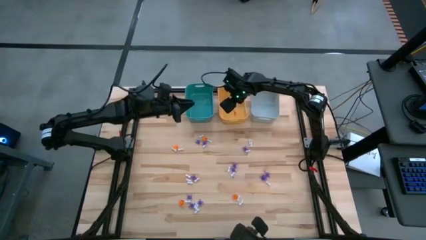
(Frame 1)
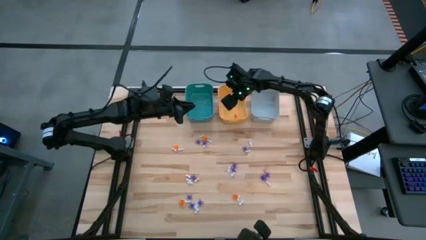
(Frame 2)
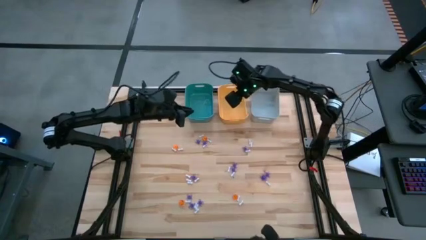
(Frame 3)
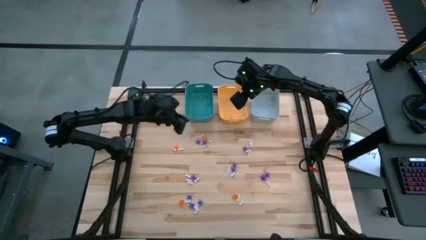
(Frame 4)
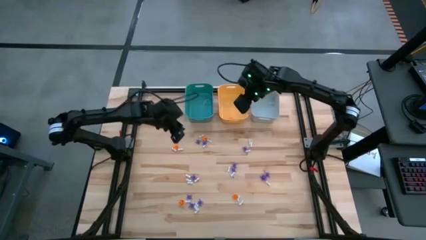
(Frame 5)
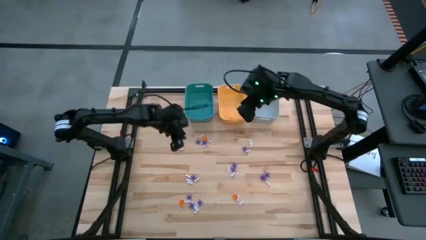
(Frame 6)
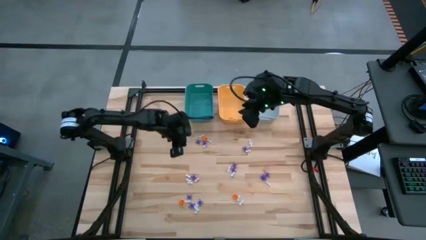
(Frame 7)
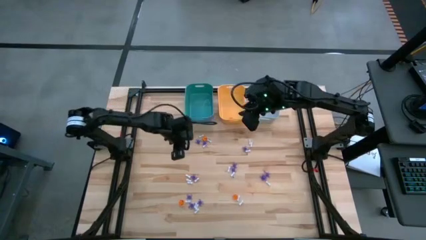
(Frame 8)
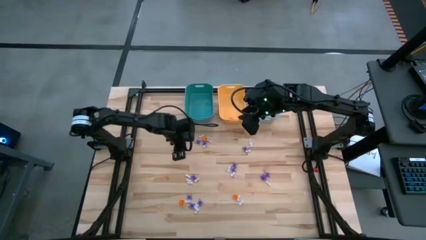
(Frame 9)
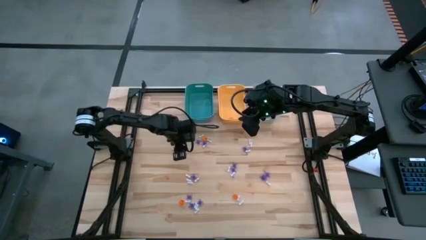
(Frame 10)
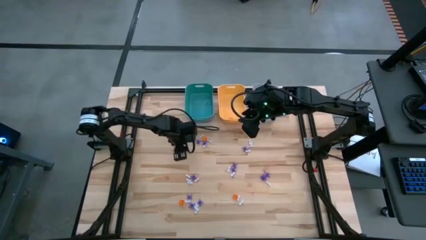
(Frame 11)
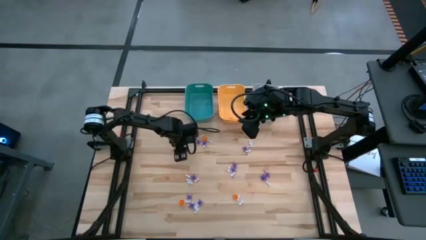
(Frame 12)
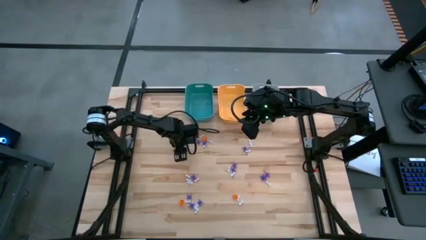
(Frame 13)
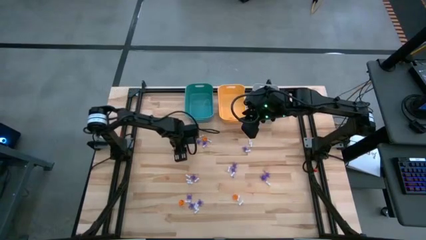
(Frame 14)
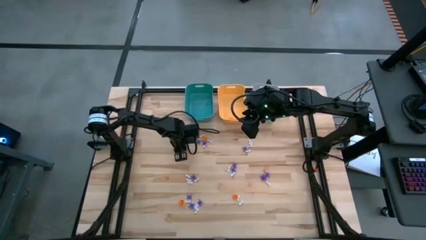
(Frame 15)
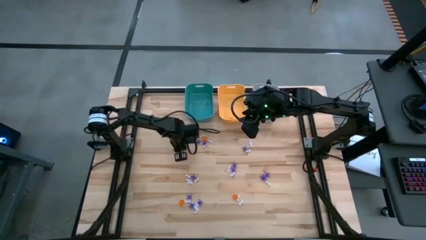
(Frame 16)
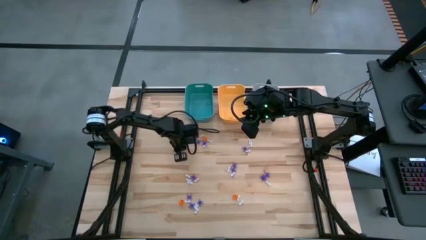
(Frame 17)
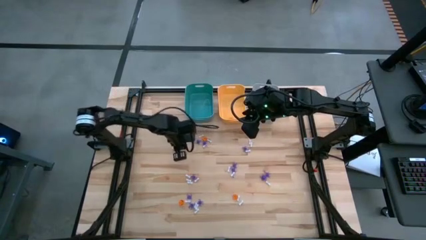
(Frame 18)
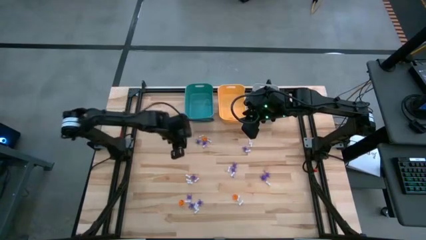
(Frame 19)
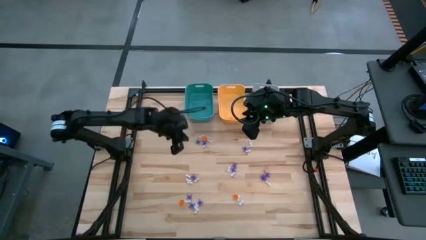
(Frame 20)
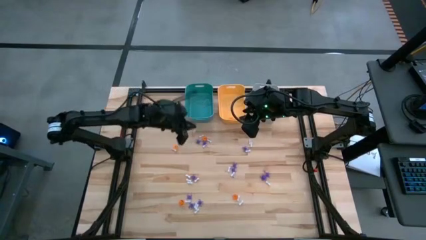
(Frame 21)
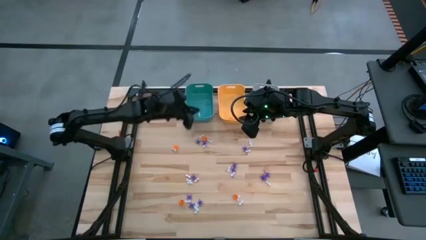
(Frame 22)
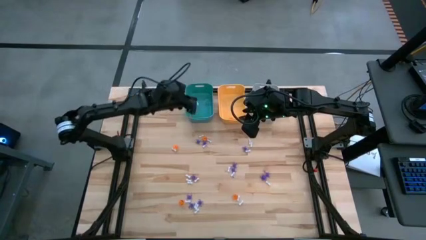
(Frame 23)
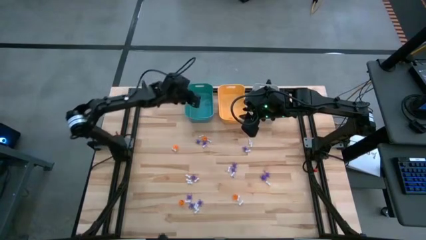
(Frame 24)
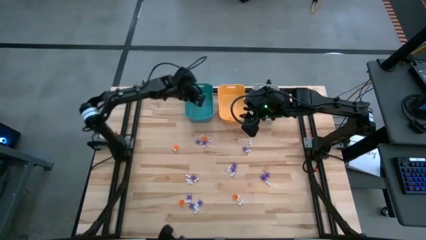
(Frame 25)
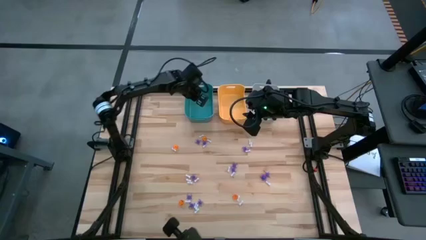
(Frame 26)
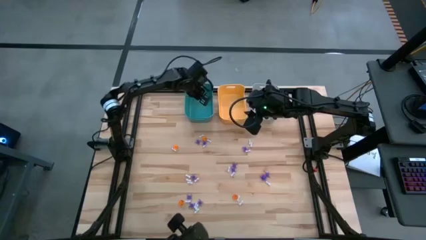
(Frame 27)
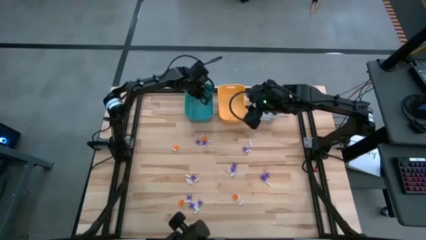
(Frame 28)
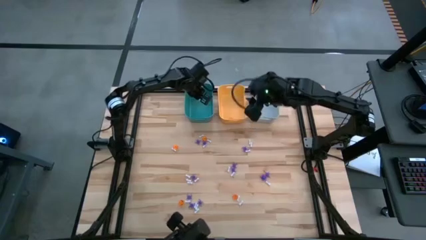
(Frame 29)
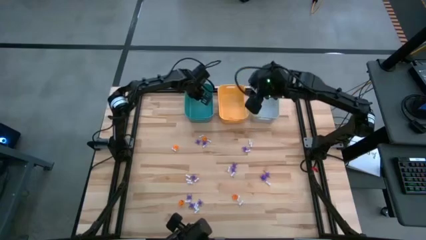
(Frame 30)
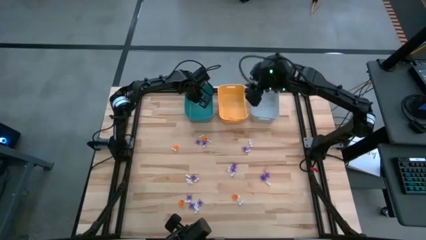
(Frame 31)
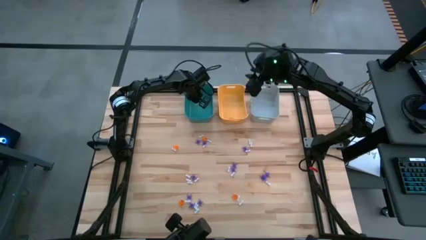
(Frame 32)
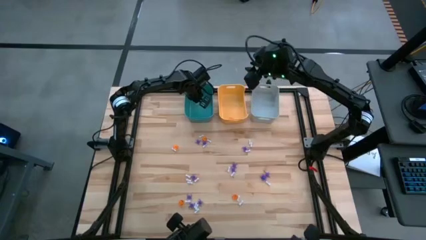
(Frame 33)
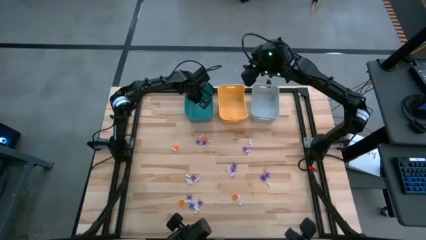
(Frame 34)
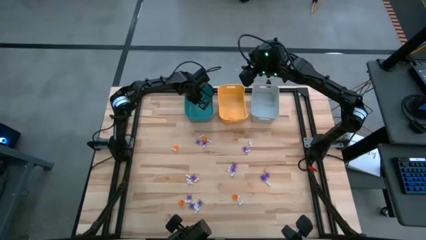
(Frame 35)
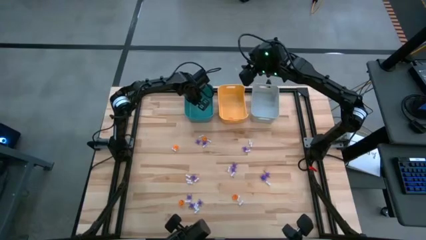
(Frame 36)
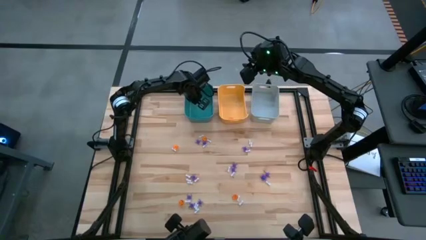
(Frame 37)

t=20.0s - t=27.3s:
Task: Sort Halloween decoration
Put the white bone toy into the blue bin

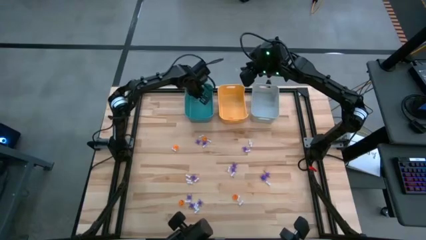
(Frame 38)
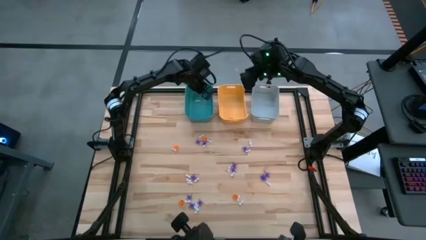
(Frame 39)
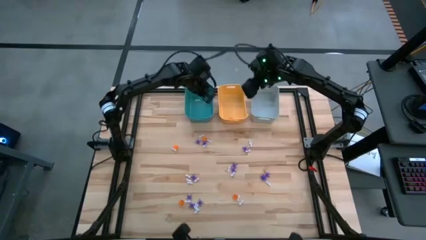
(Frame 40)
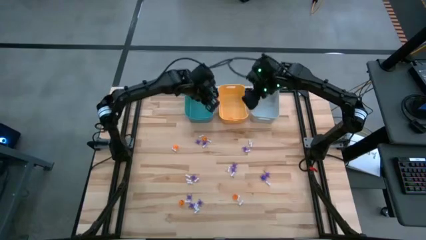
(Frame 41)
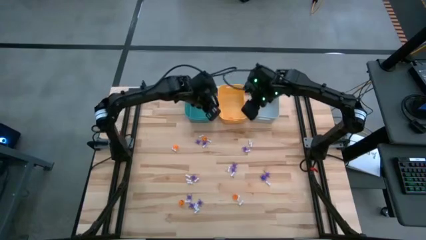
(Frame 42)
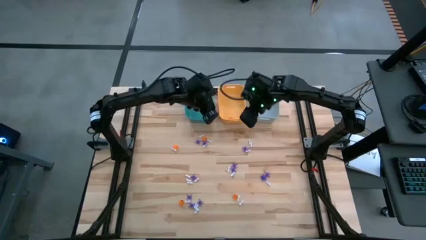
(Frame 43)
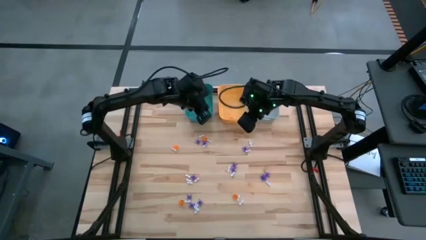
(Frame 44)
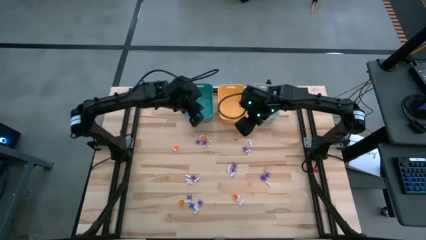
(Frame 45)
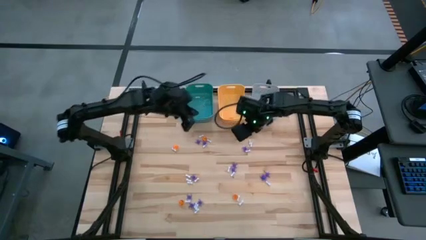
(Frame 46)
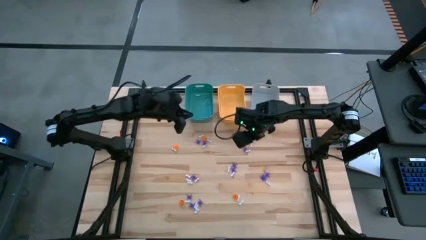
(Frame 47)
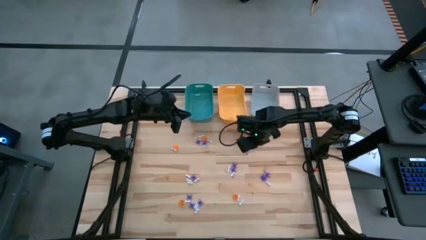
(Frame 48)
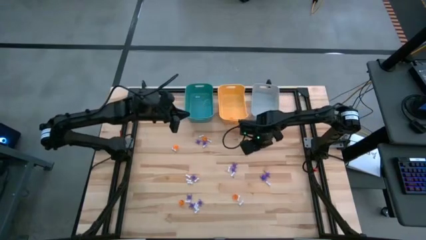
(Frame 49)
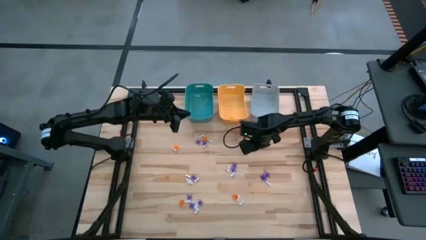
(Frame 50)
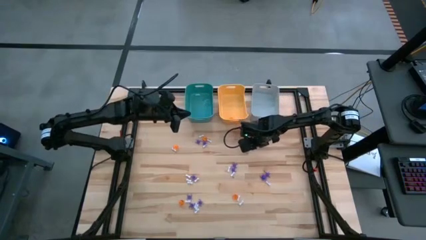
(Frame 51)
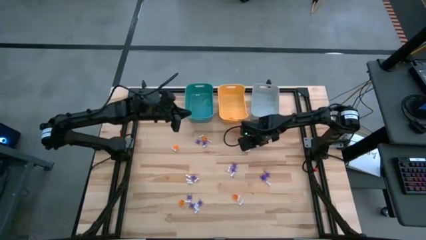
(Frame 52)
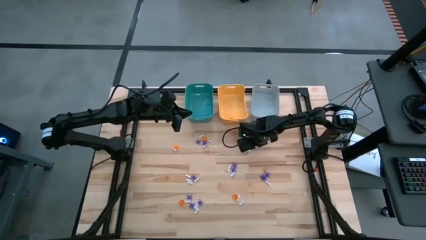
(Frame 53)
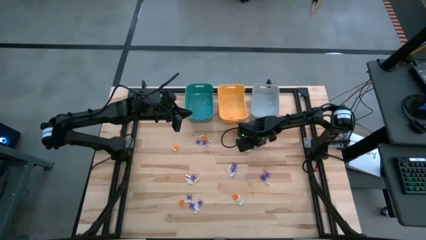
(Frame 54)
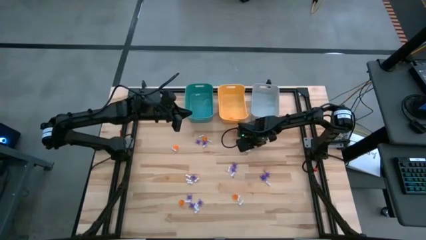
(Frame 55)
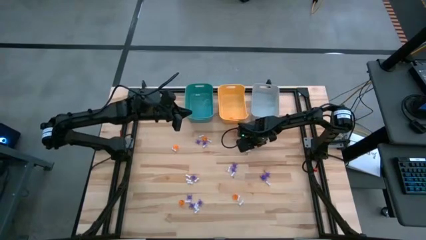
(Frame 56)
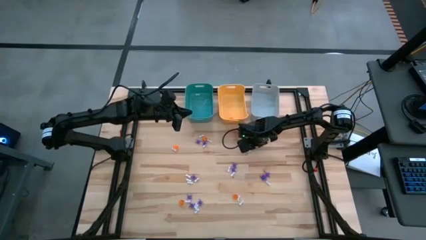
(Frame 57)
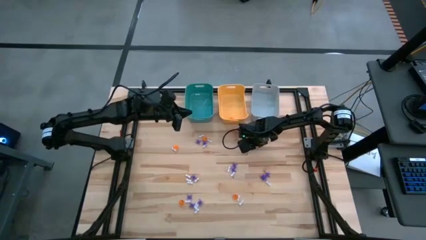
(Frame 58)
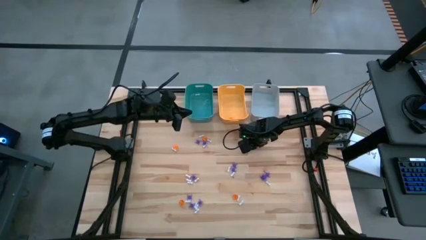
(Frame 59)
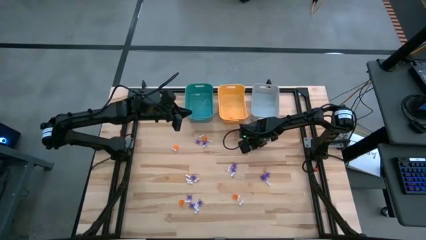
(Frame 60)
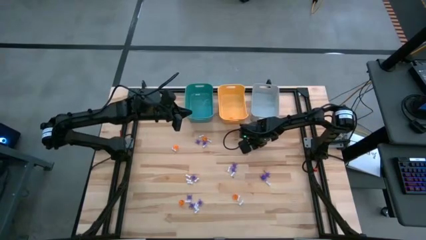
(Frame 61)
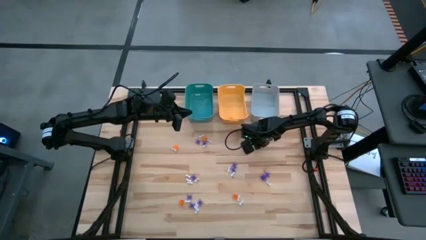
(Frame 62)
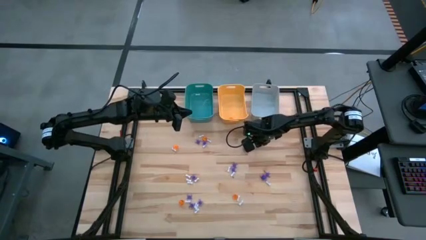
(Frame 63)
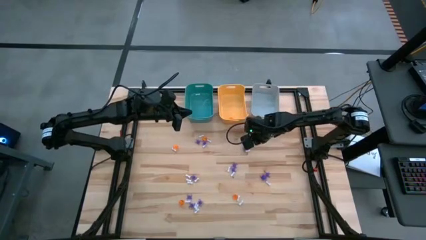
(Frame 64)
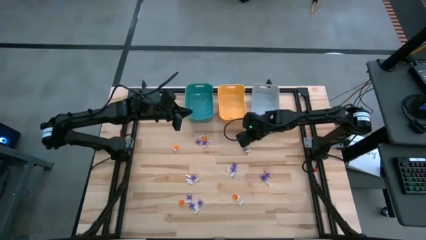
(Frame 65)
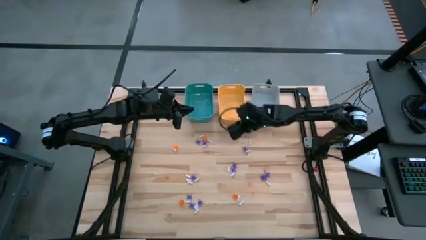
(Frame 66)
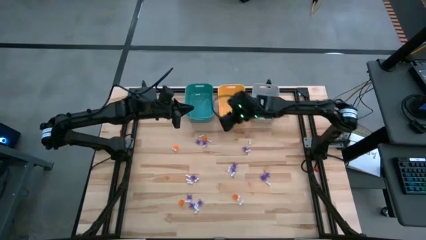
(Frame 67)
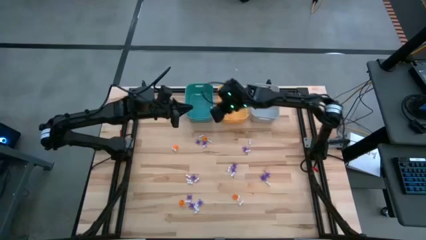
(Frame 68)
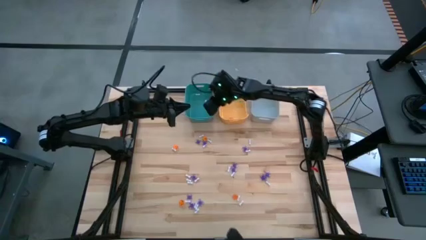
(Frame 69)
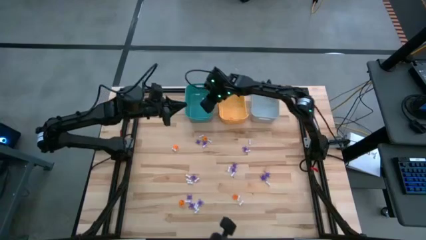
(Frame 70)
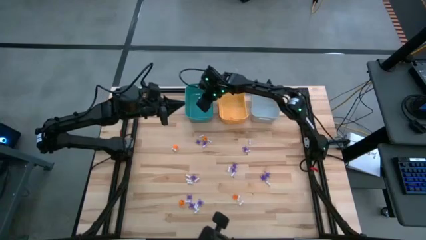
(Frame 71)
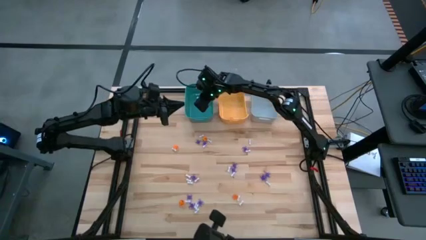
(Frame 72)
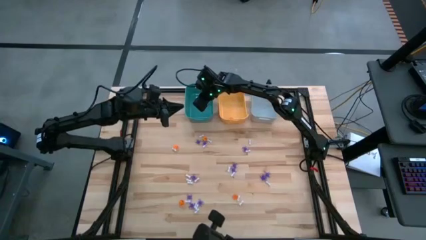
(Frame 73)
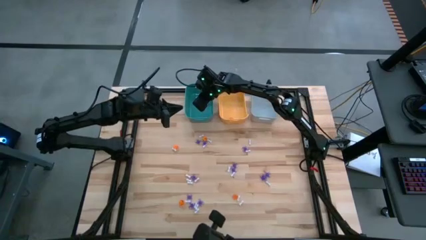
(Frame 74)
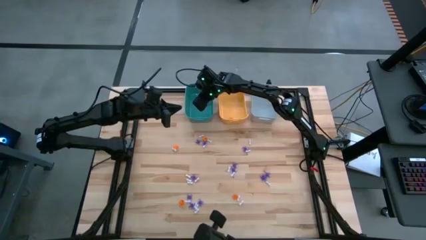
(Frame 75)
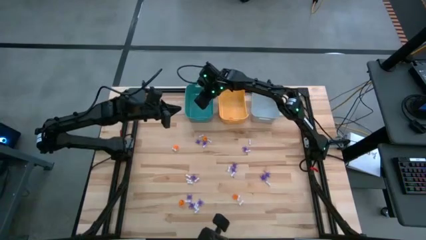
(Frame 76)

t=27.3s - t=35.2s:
Put the white bone toy into the blue bin
